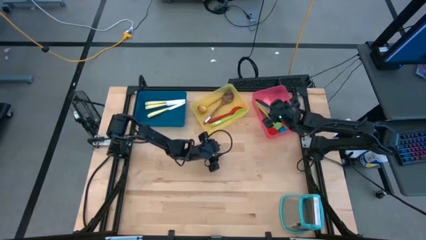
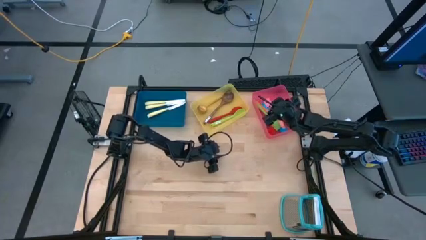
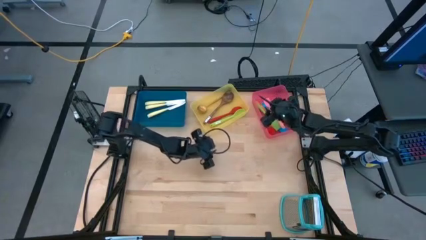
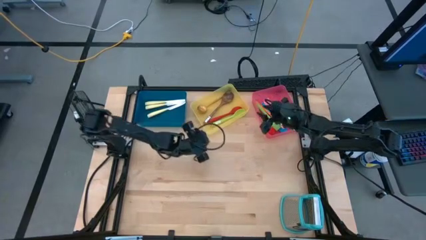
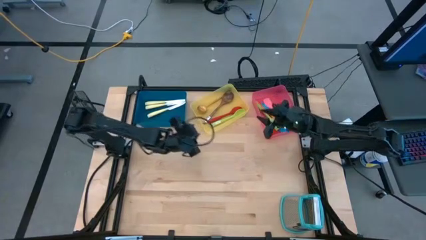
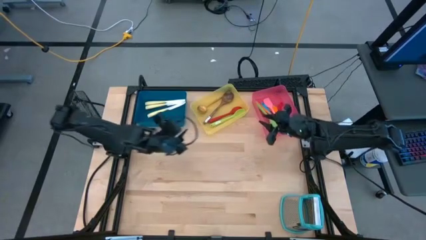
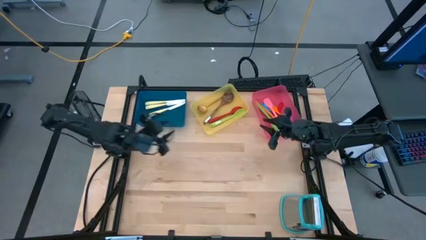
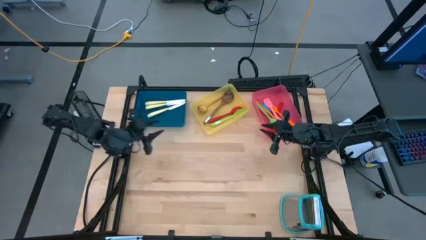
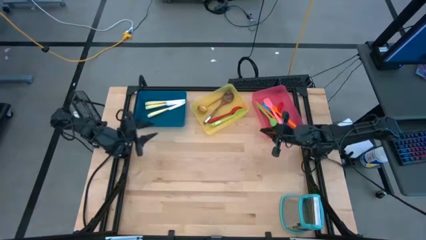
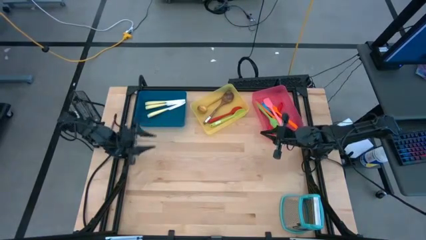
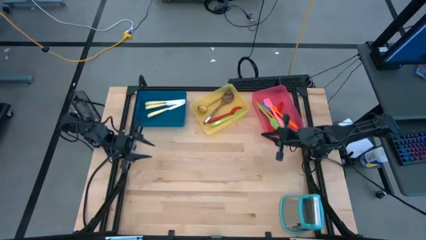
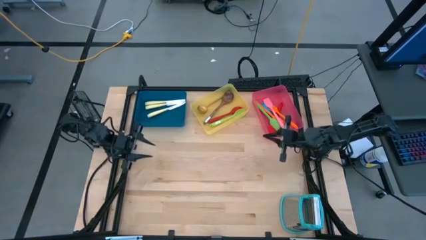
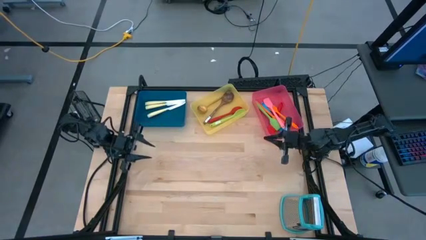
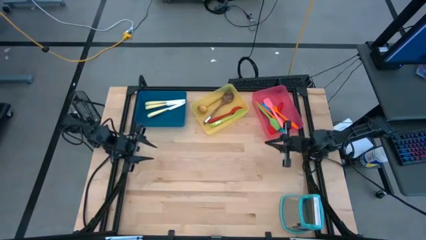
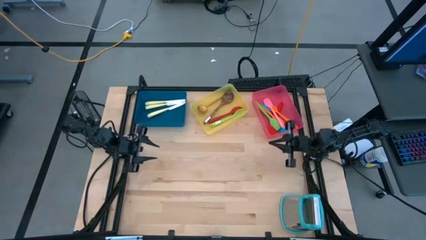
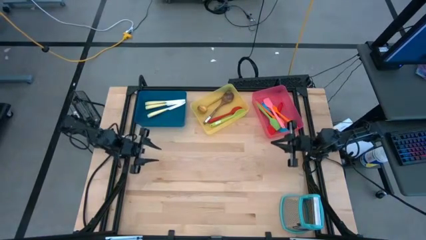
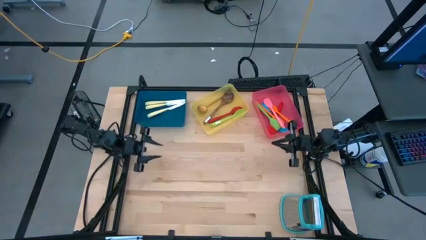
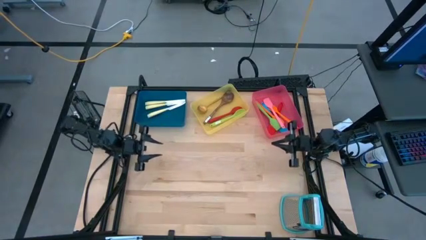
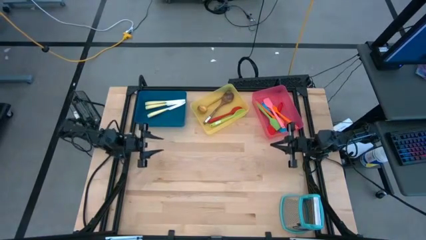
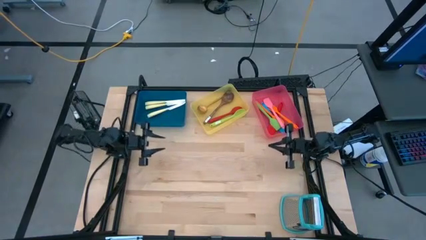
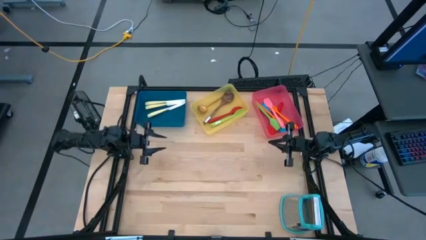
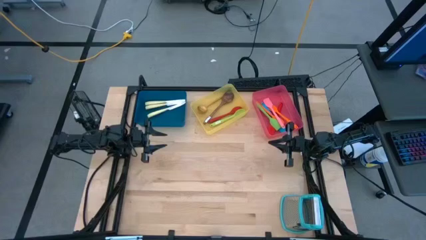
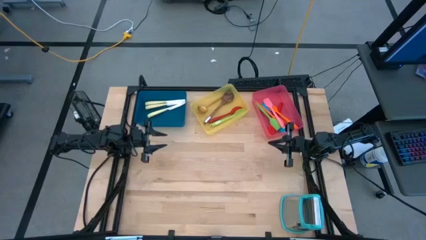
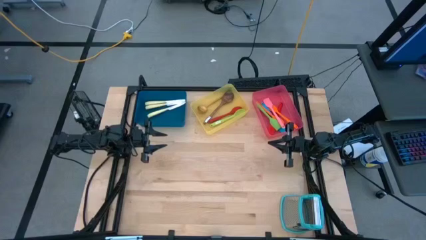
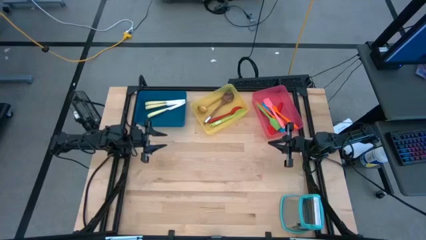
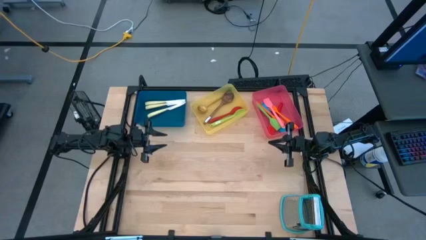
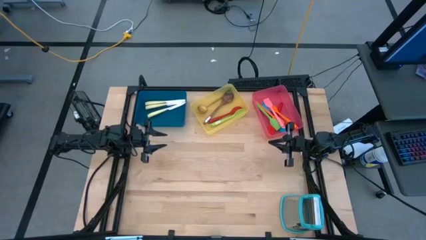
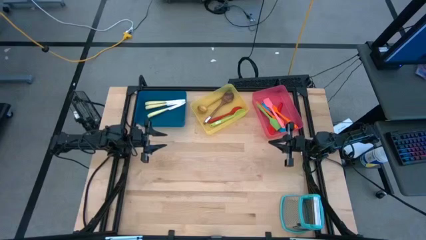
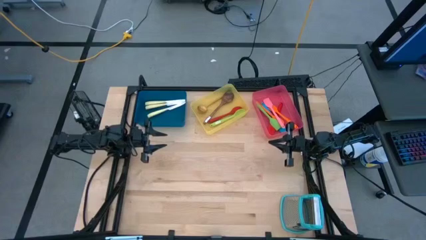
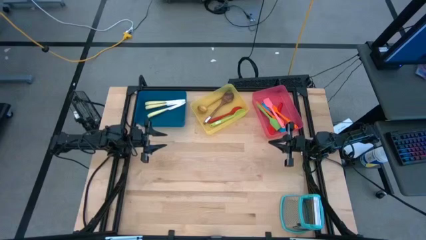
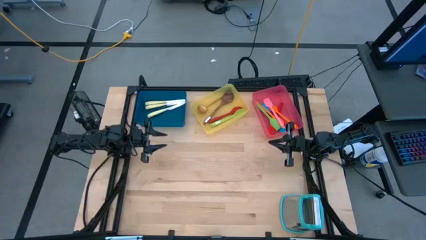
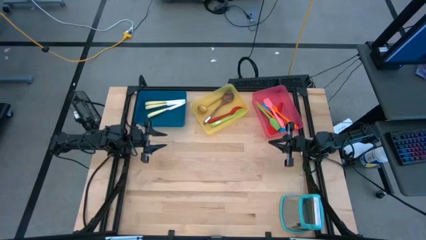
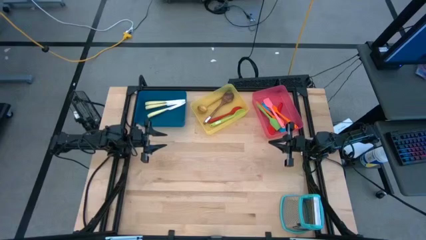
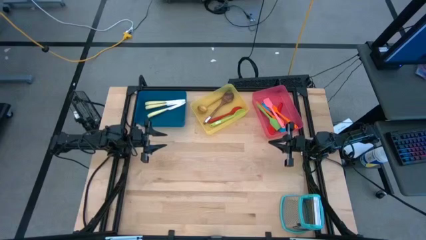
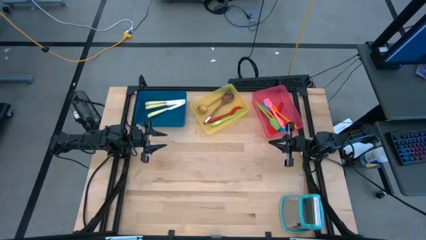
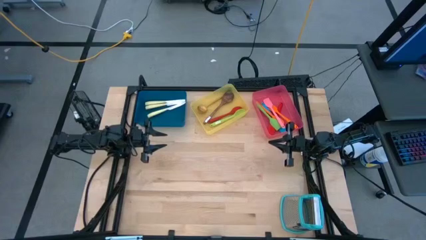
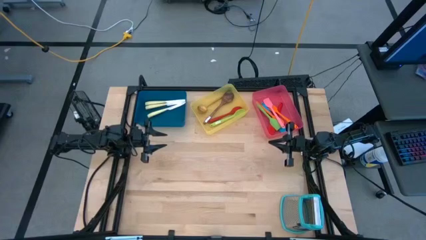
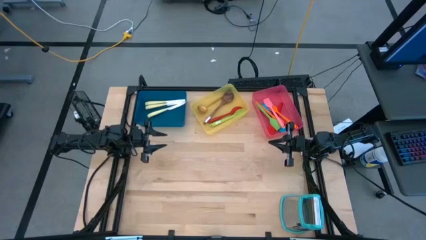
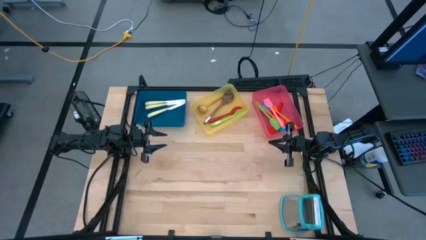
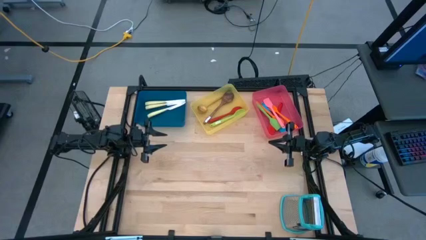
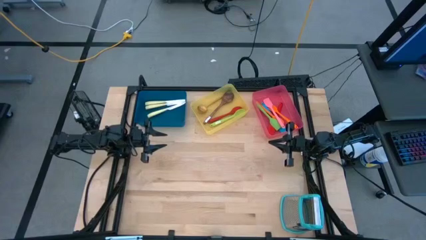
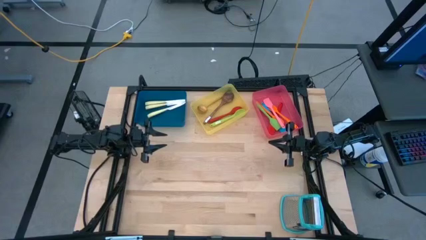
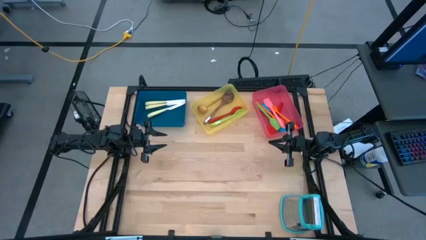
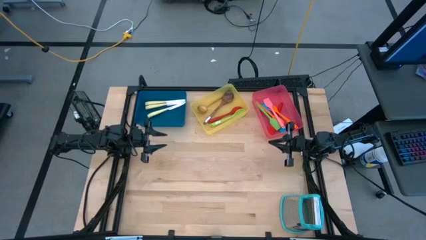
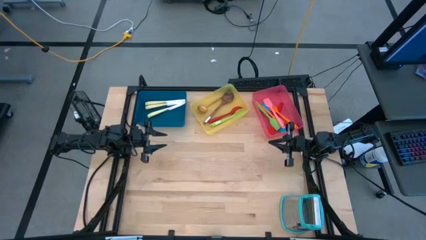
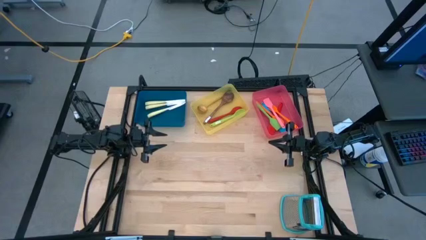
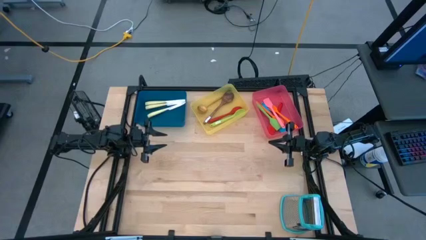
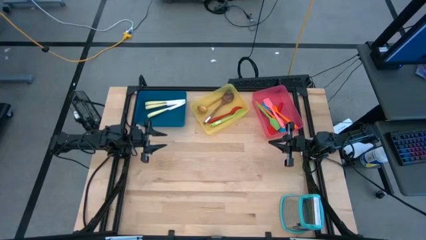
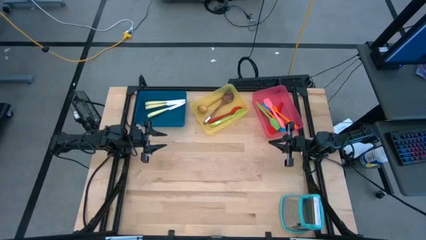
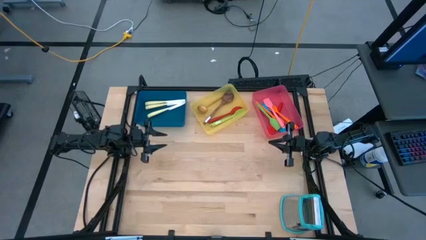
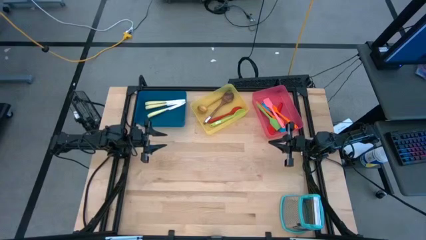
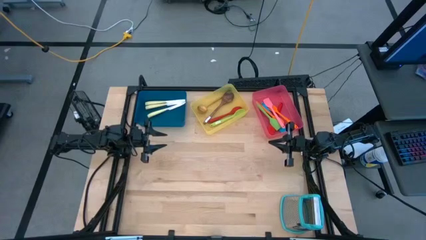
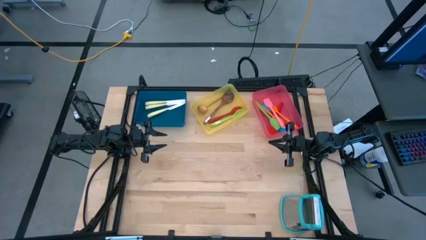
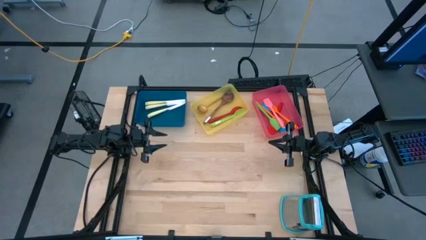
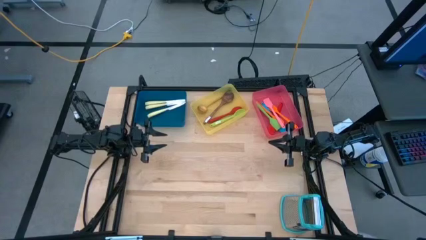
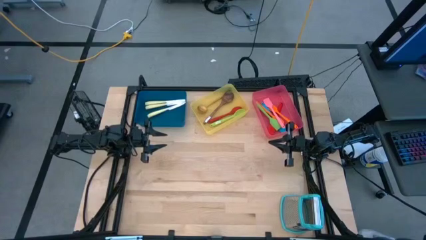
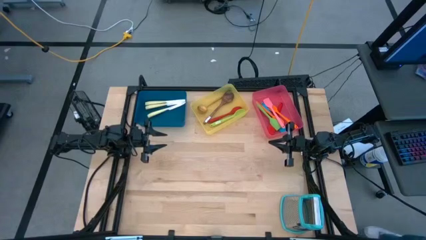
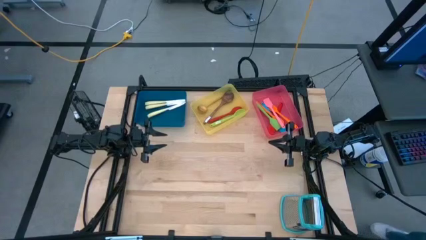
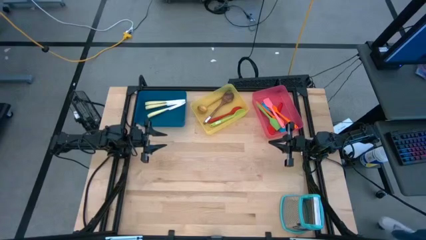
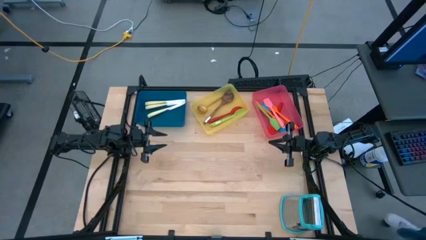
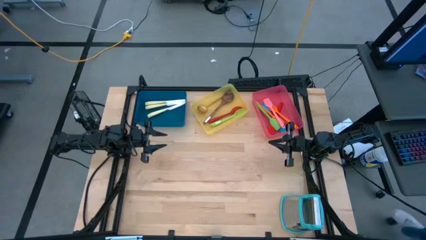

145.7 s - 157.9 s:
Task: Pick & Place Kitchen Items
Return to Home Position

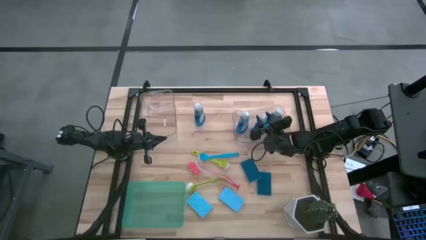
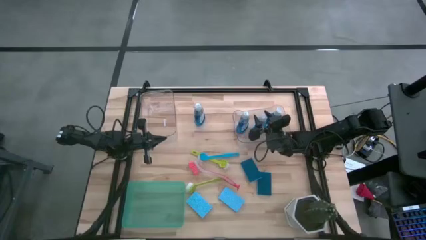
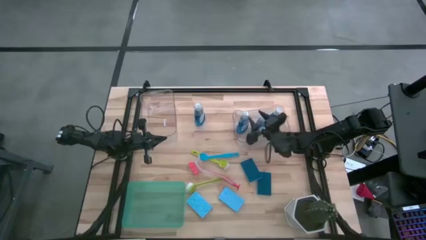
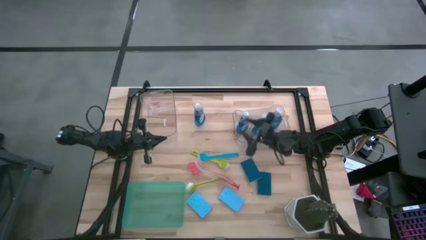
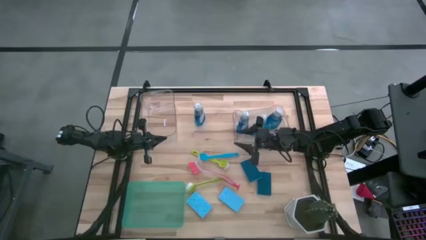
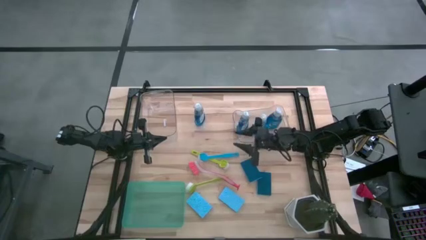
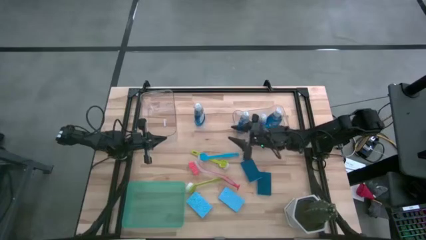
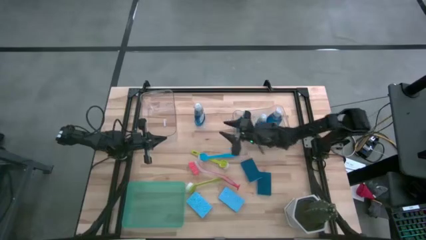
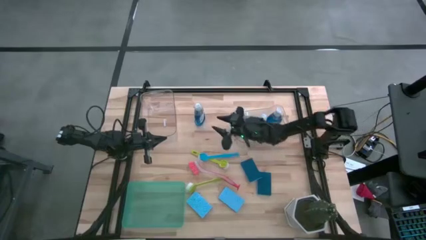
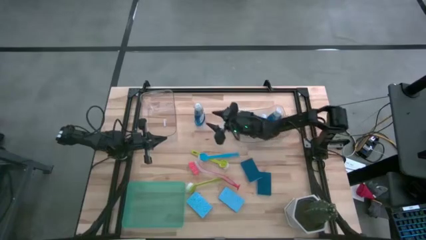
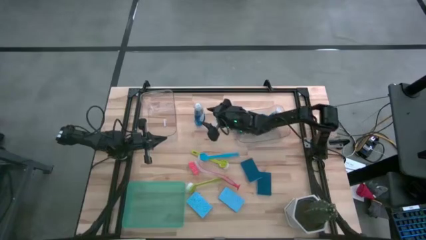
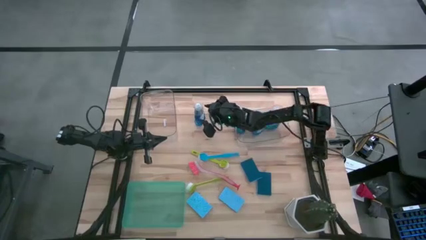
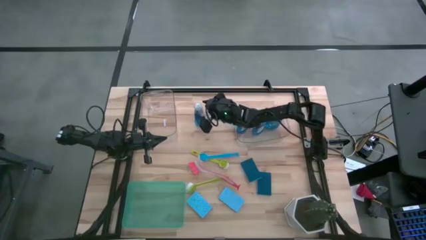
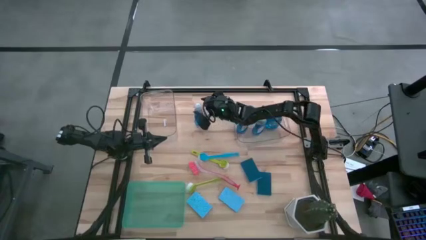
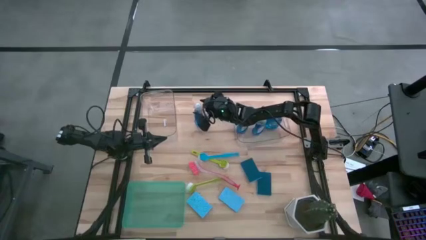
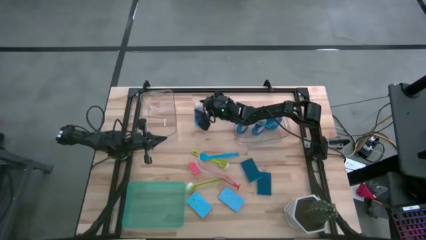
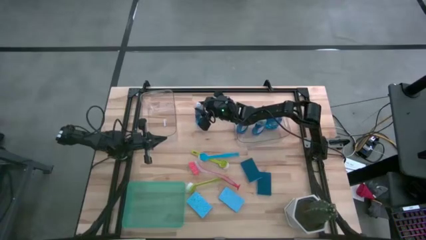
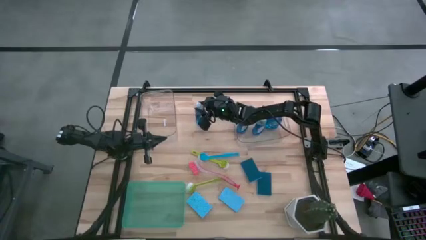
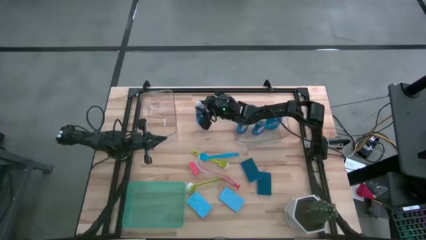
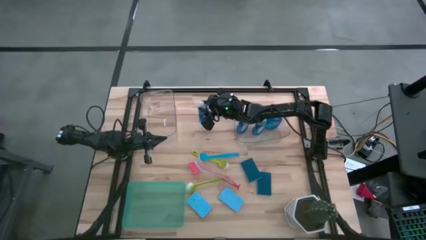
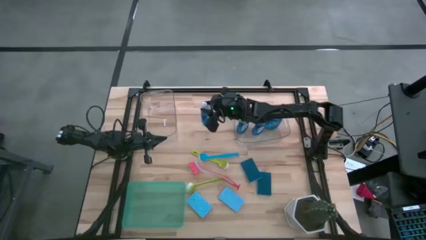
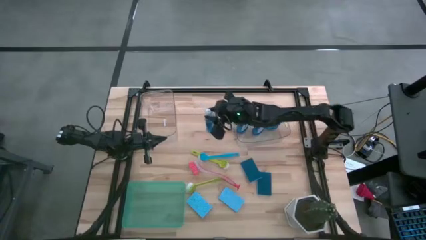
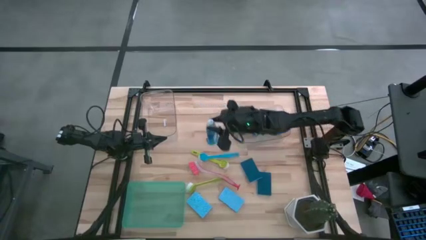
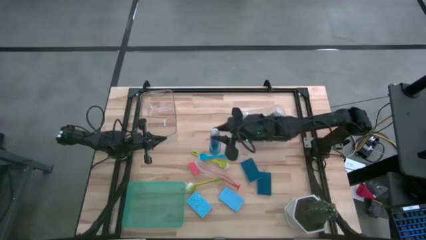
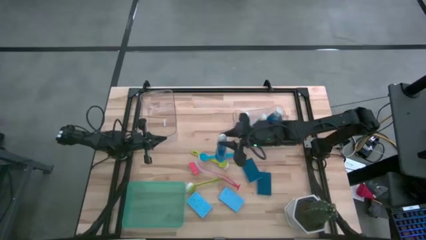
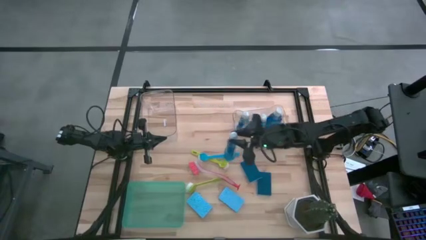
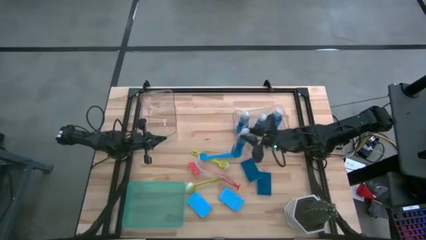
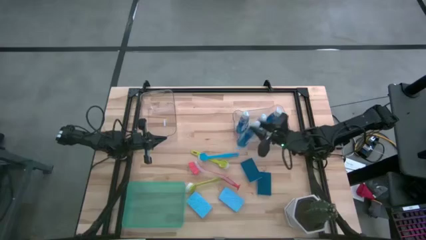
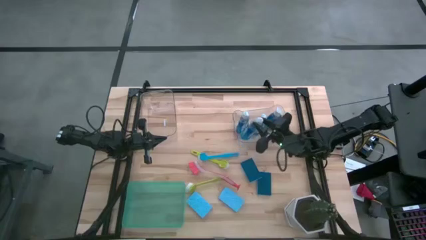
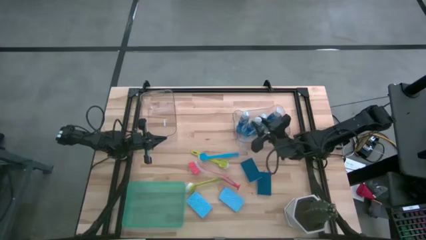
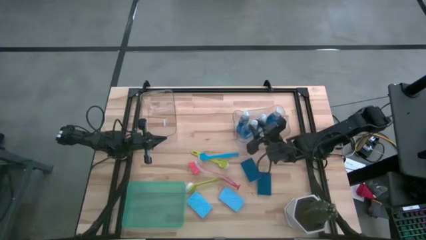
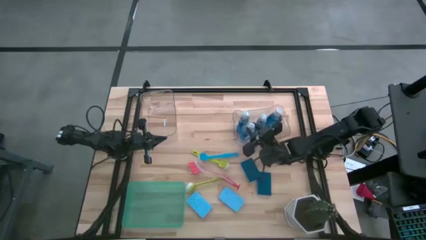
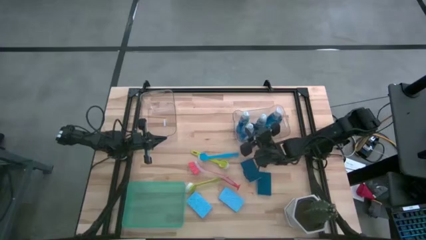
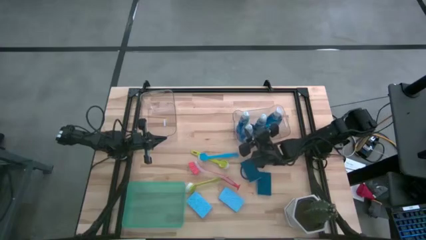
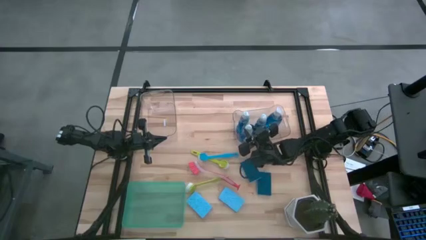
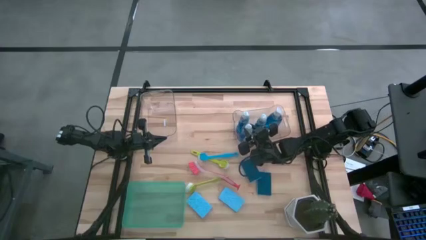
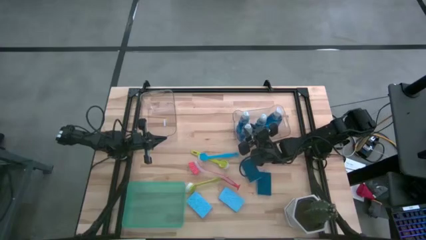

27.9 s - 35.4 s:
Task: Pick & Place Kitchen Sink Supplies
Put the soap dispenser into the right transparent bin
